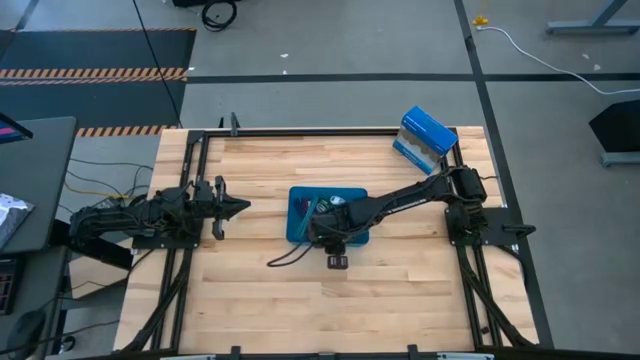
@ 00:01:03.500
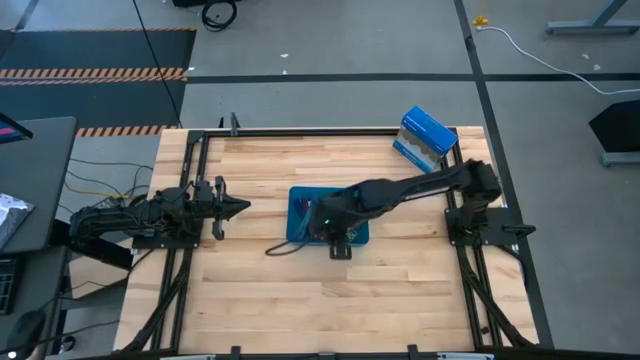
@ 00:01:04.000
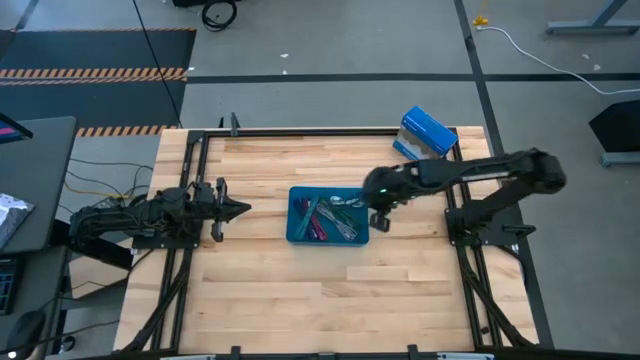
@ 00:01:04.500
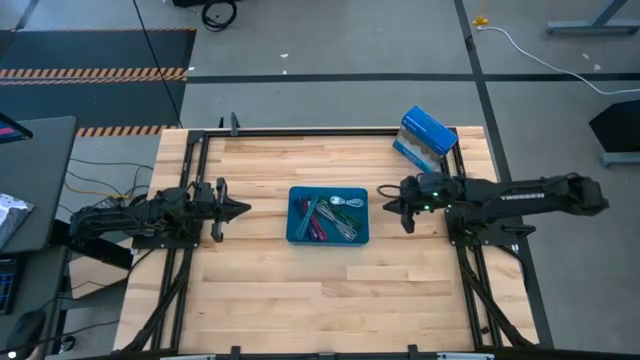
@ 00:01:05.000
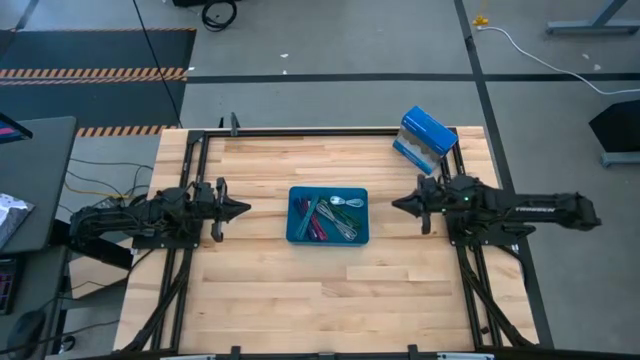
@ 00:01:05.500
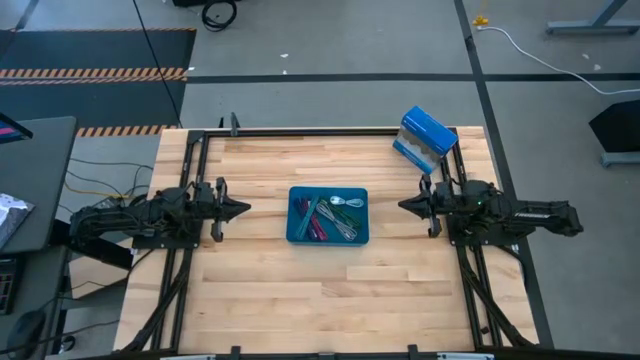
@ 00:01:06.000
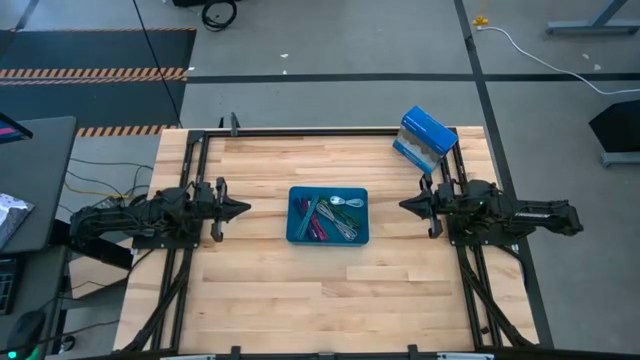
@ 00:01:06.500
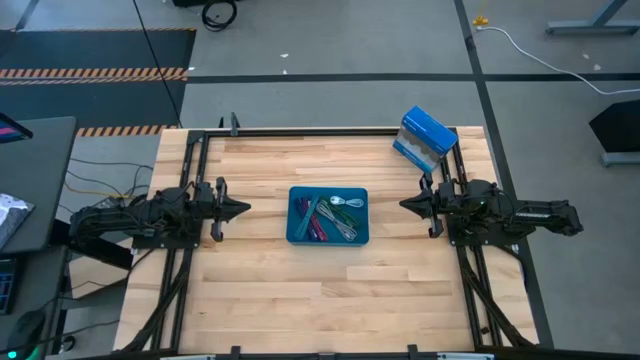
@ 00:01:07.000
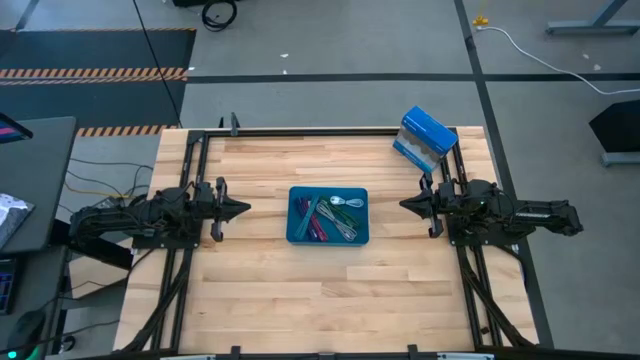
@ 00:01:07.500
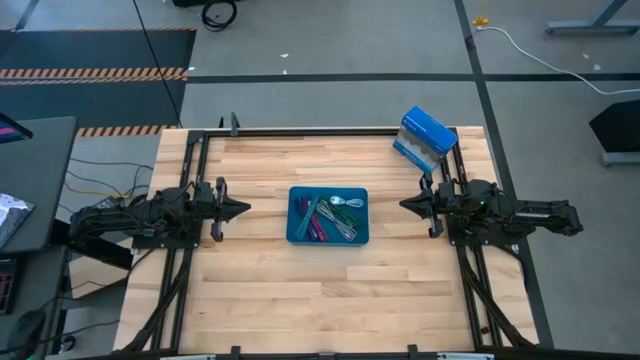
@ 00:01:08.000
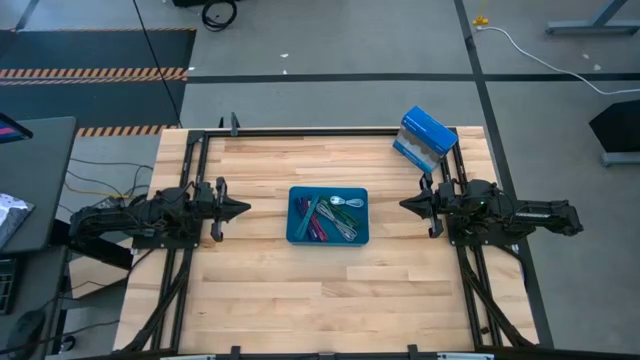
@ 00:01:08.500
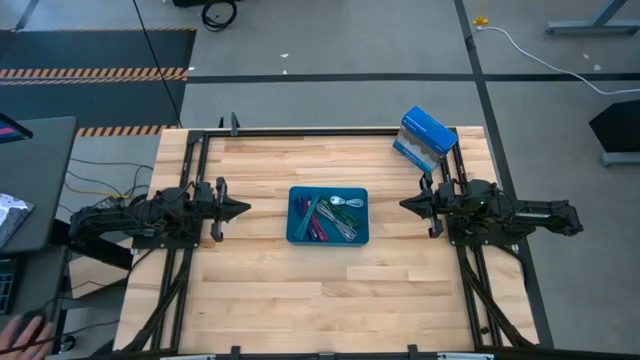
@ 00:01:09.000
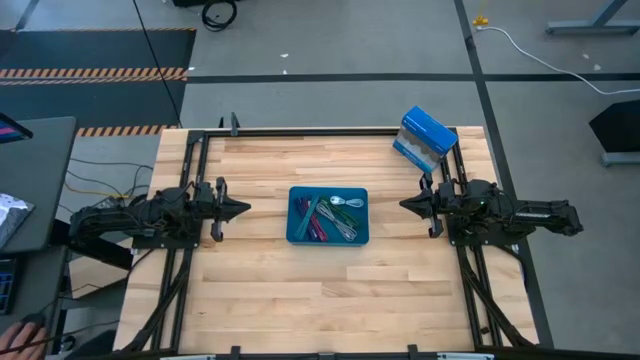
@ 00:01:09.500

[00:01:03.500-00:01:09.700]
Task: Pick and place USB-C Cables
Return to Home Position

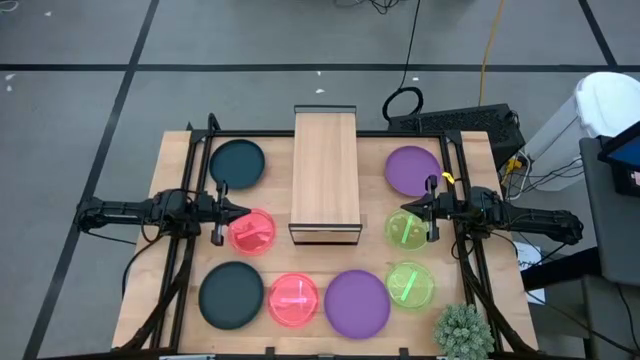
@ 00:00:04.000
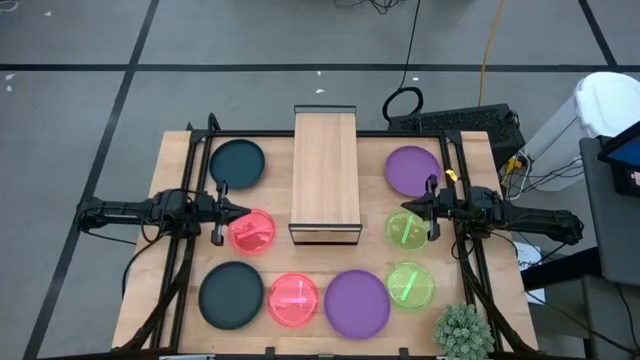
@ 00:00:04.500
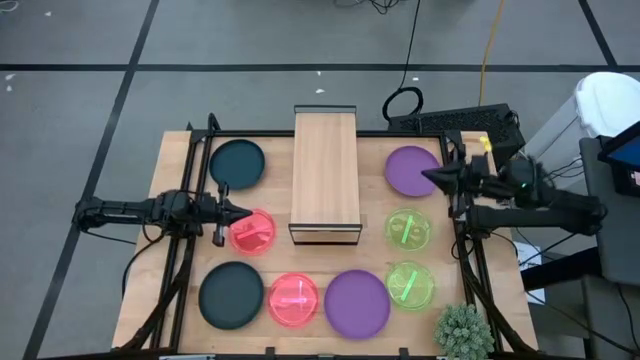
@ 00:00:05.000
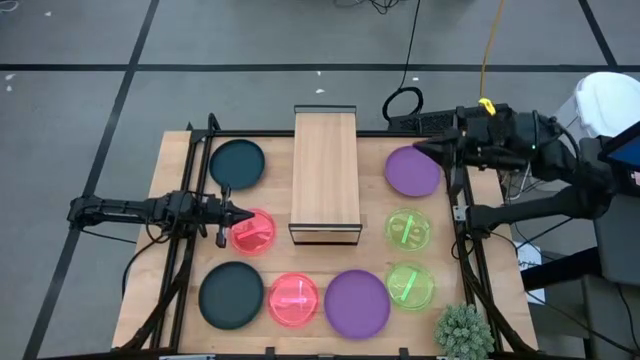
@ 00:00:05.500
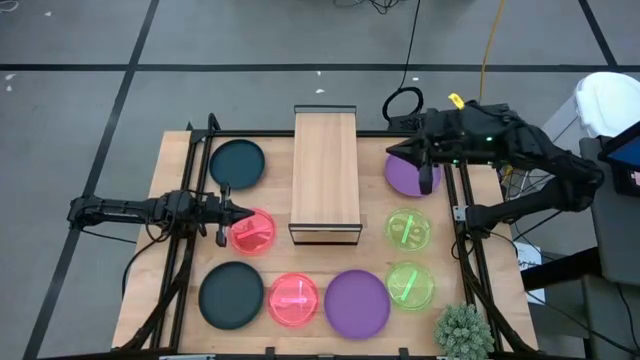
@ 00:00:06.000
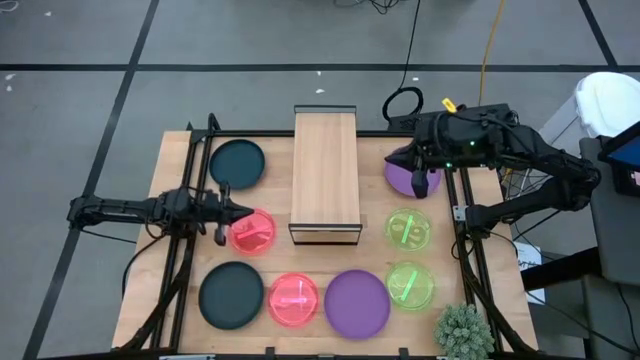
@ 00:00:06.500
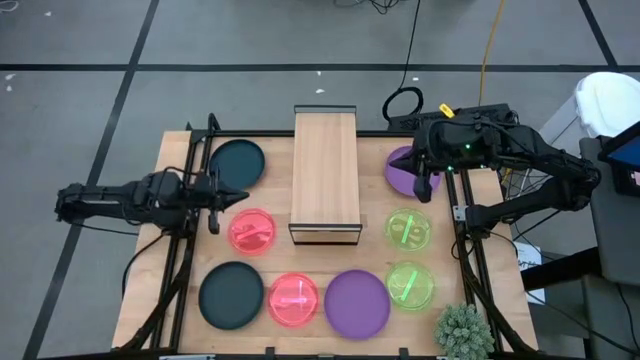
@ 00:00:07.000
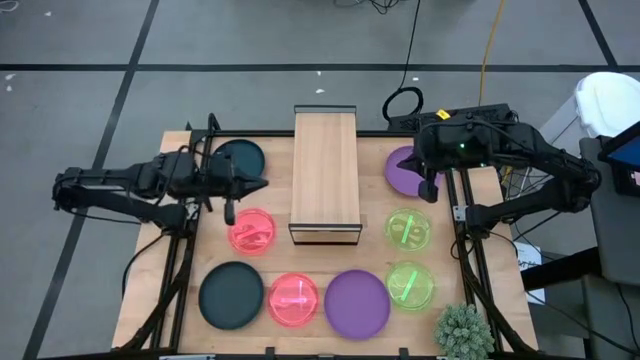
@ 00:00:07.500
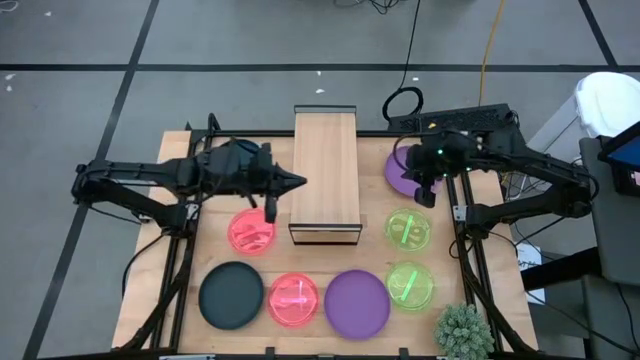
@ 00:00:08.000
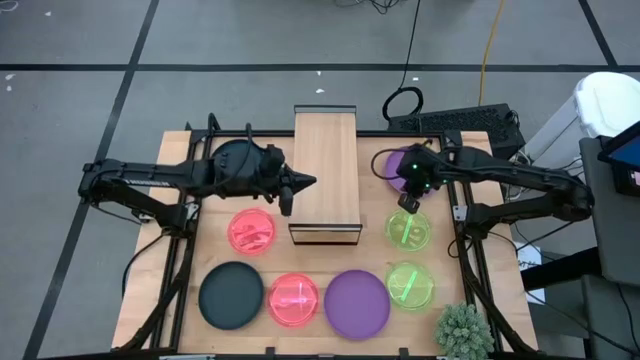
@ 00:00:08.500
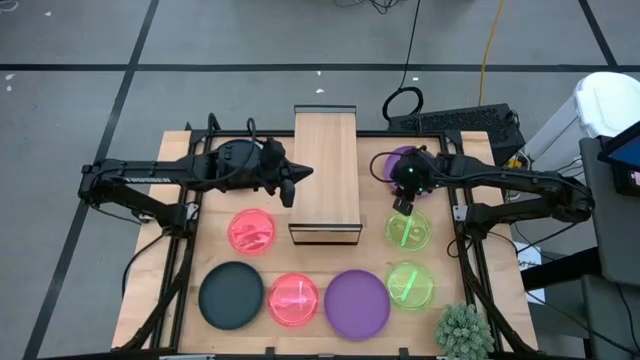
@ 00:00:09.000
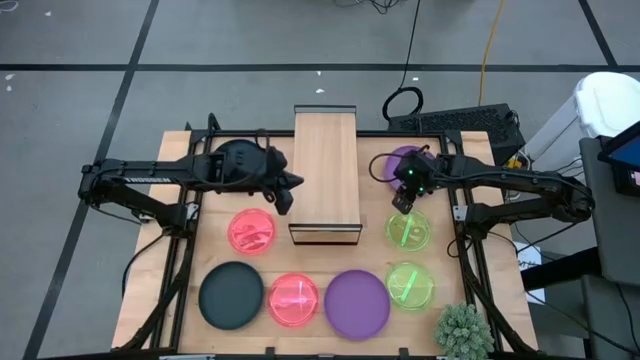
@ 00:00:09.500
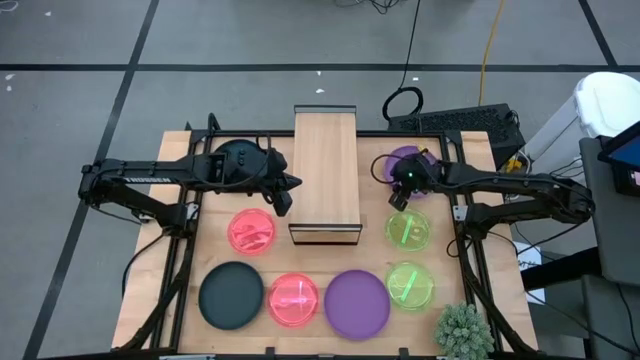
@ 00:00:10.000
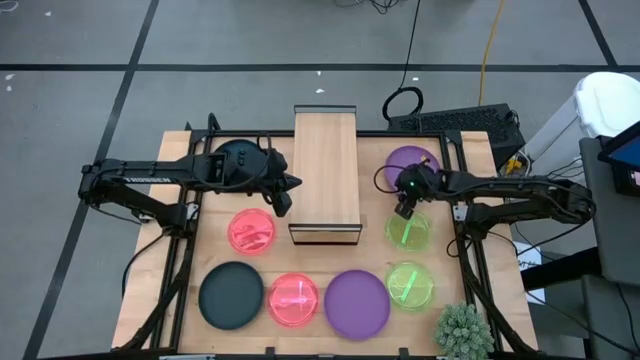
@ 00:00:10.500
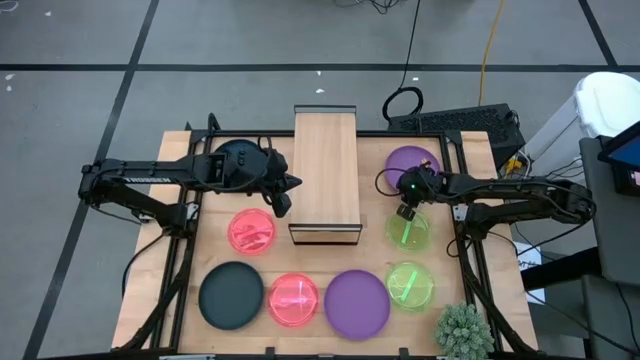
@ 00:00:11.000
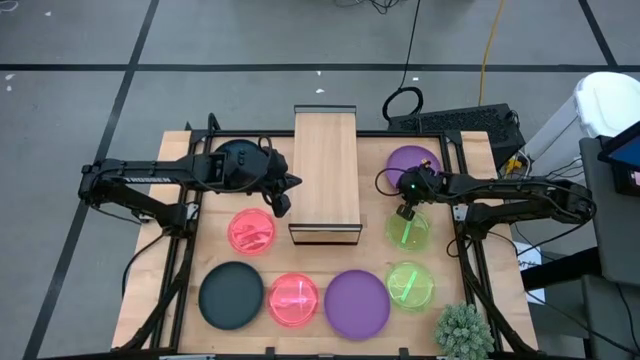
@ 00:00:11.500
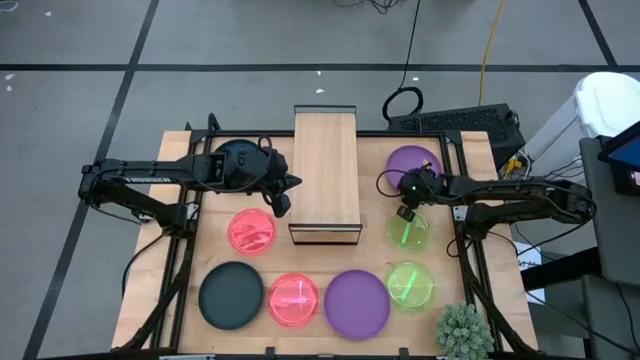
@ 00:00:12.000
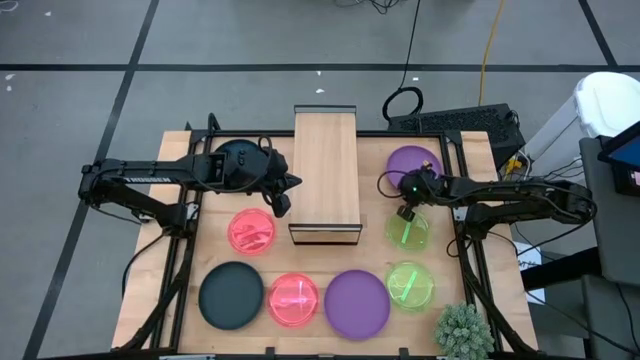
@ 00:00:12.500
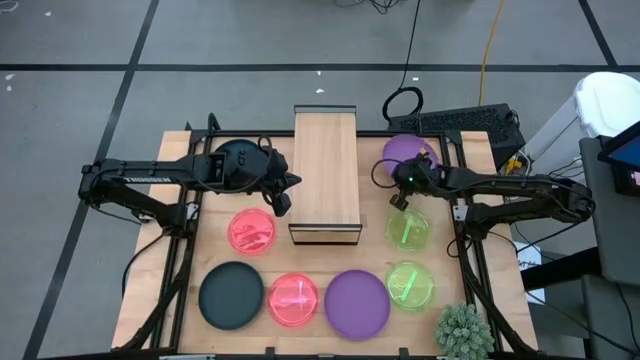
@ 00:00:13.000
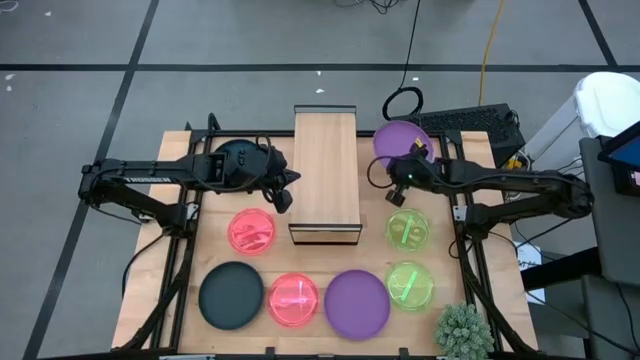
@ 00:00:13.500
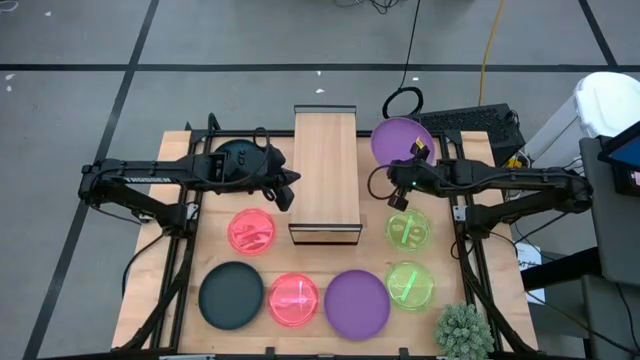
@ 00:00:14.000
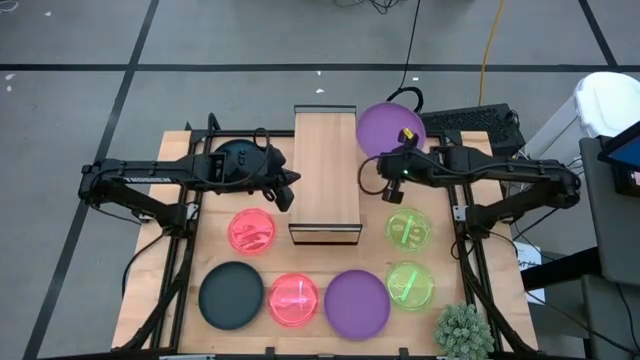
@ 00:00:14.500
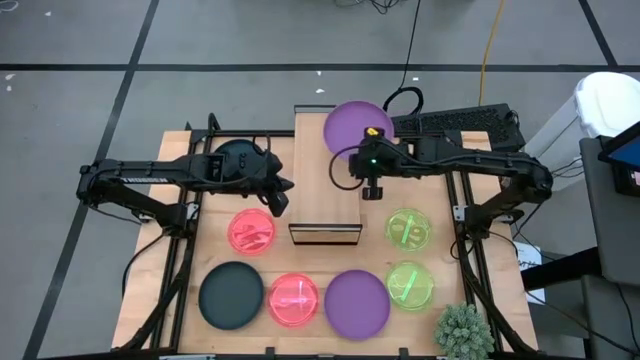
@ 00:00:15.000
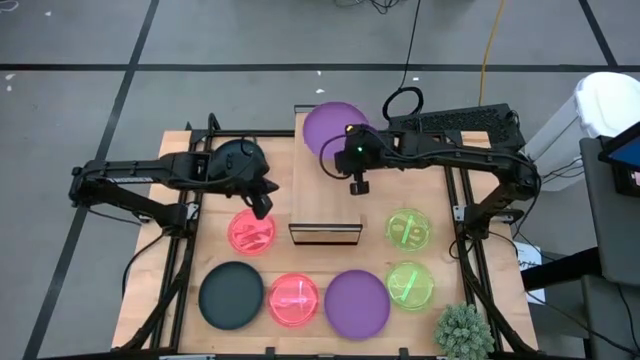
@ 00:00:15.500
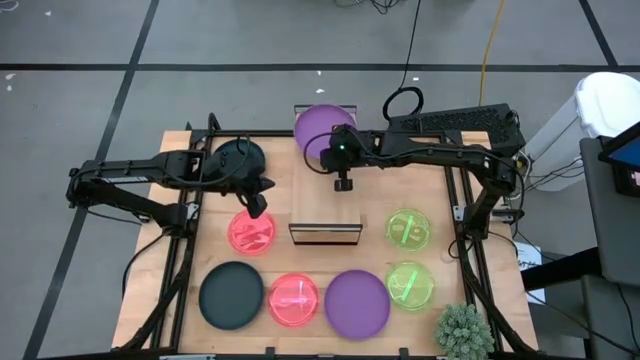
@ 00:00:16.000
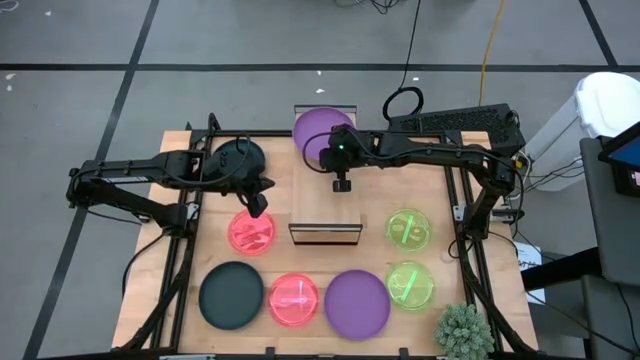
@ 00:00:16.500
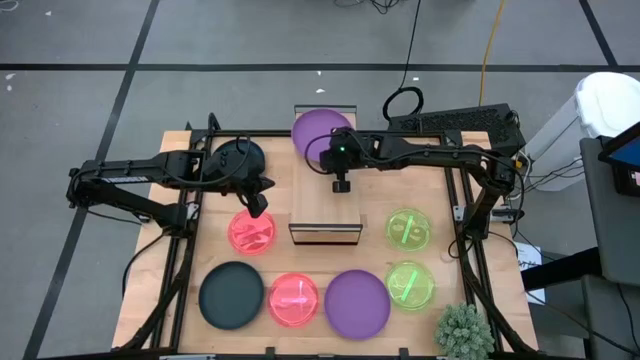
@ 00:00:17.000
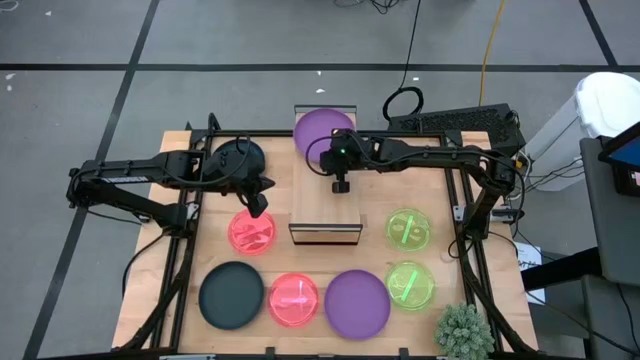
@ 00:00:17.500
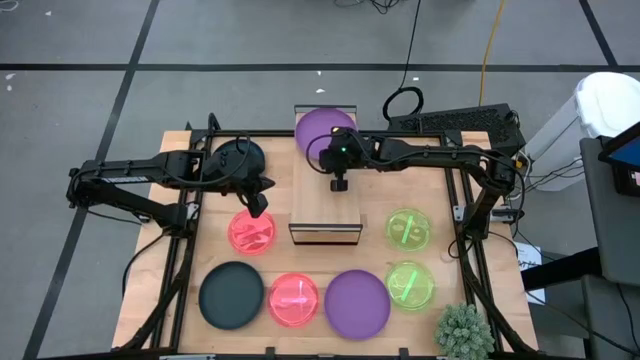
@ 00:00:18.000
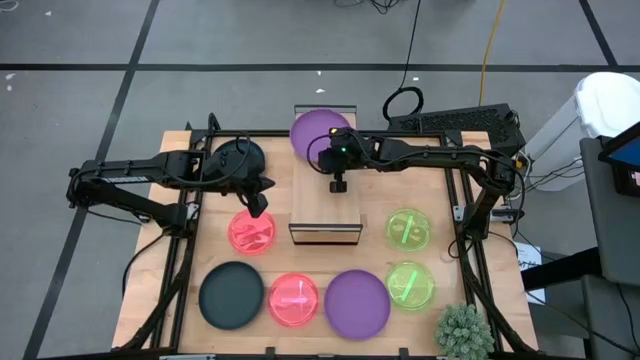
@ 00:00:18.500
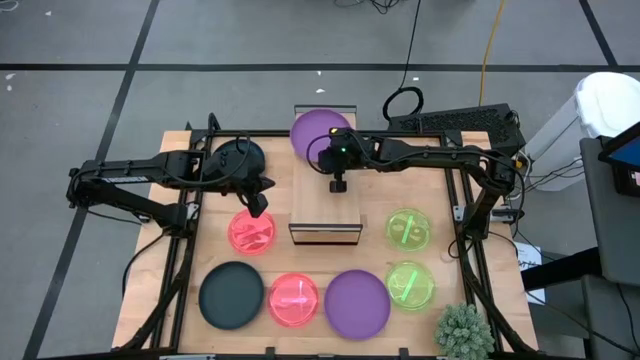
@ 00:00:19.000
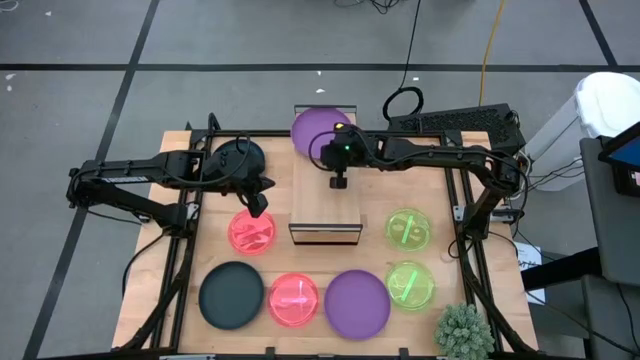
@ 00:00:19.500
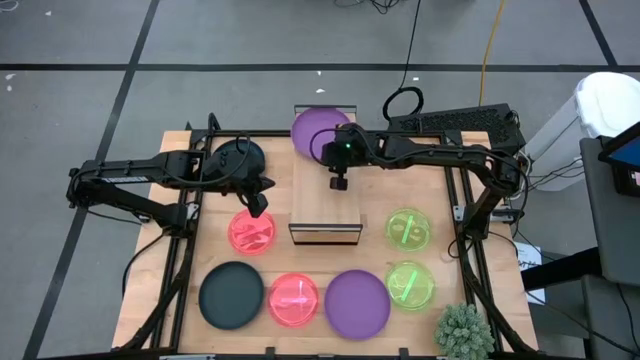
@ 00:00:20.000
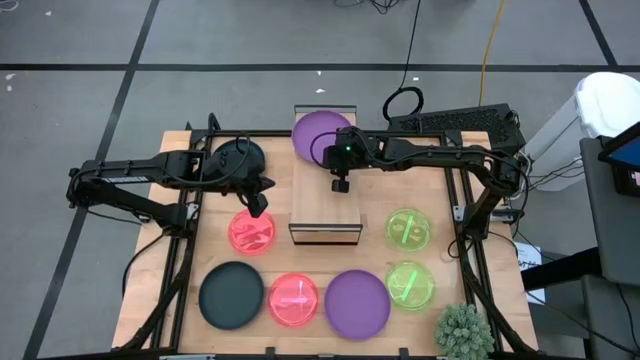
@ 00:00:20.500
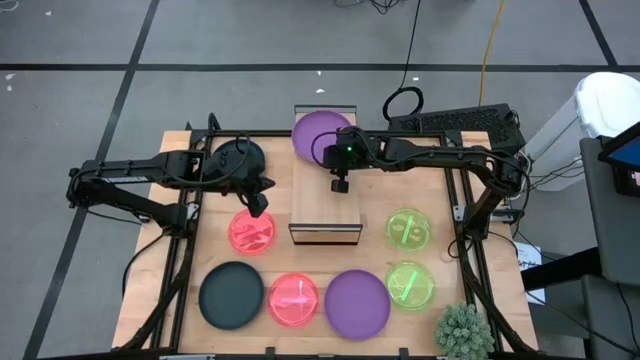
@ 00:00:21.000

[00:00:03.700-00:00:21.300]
Task: Place and stack plates onto a shelf
Put the top purple plate on the shelf
